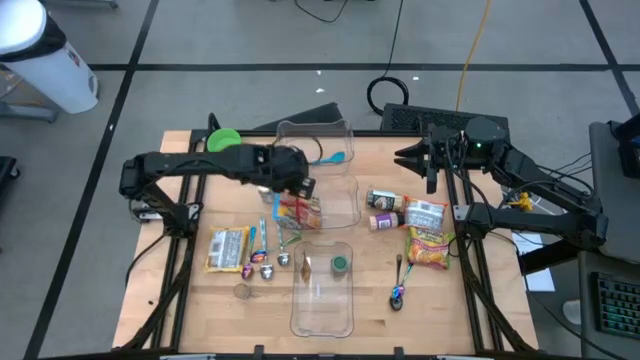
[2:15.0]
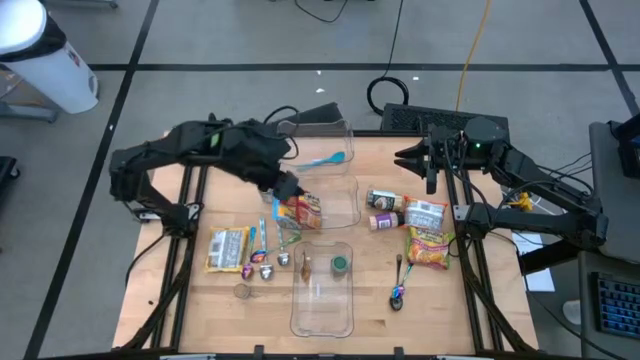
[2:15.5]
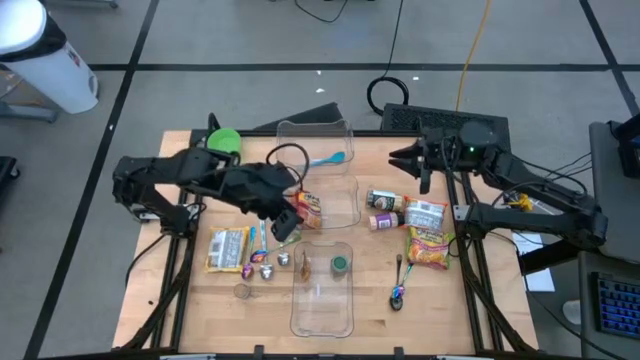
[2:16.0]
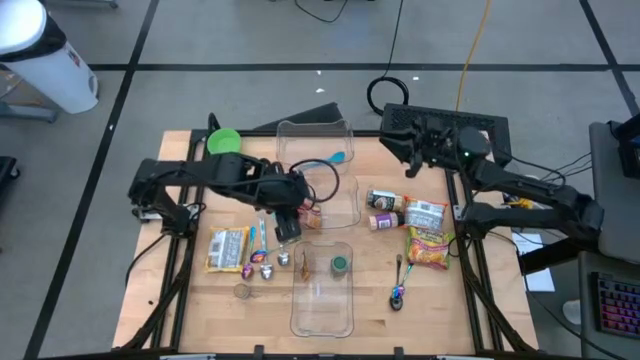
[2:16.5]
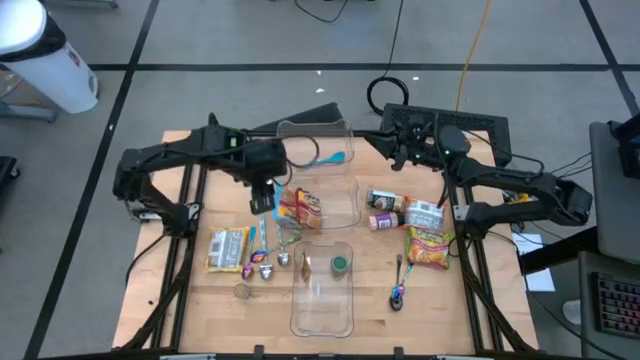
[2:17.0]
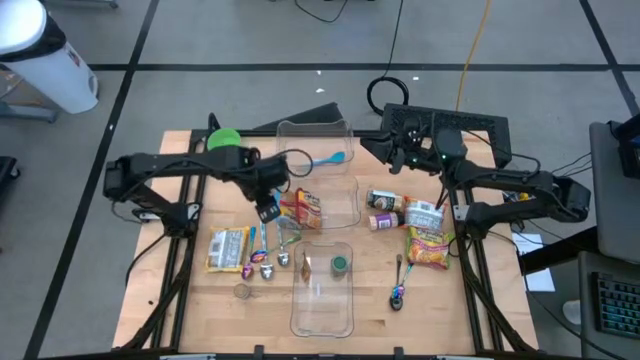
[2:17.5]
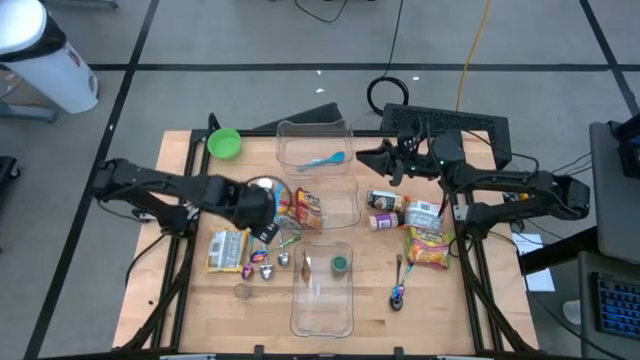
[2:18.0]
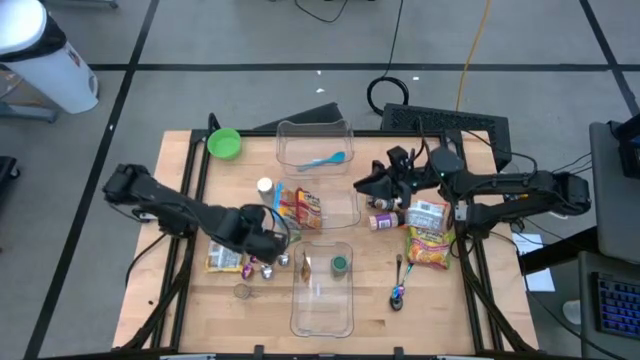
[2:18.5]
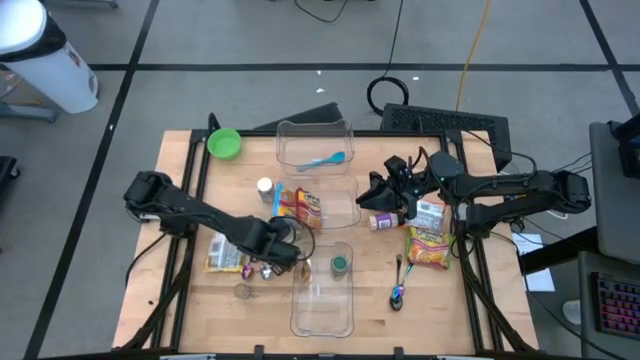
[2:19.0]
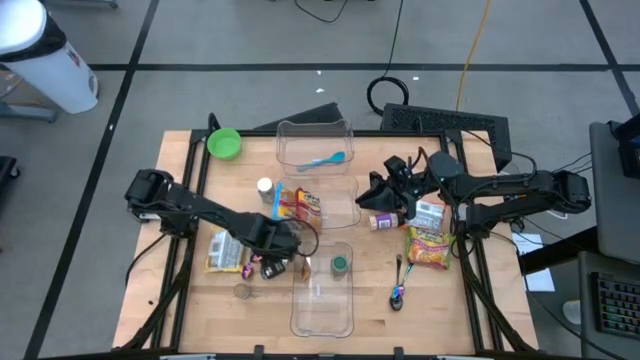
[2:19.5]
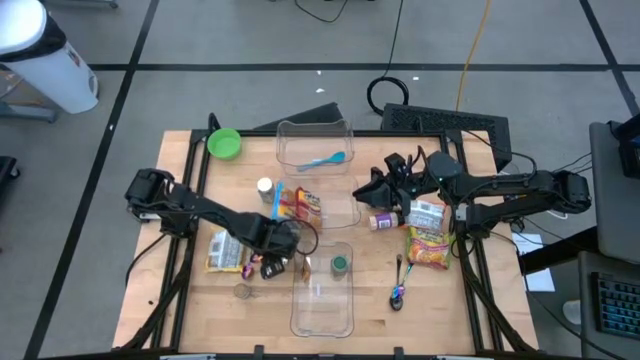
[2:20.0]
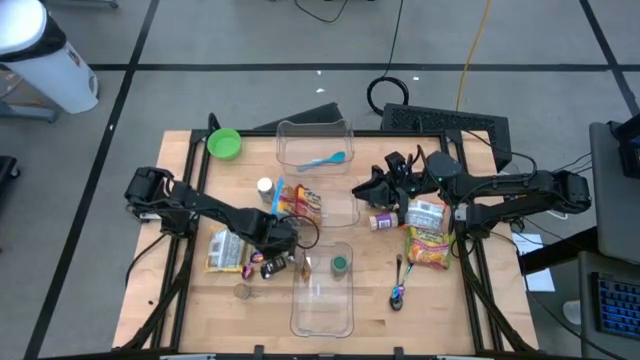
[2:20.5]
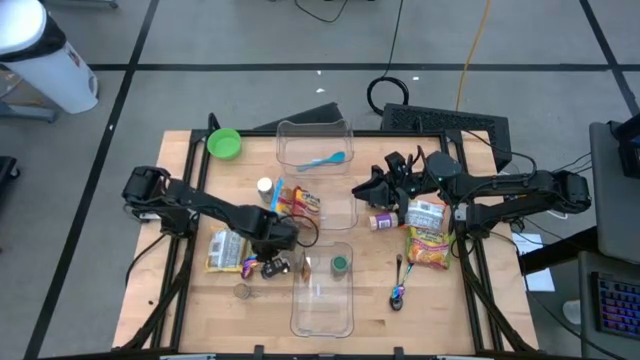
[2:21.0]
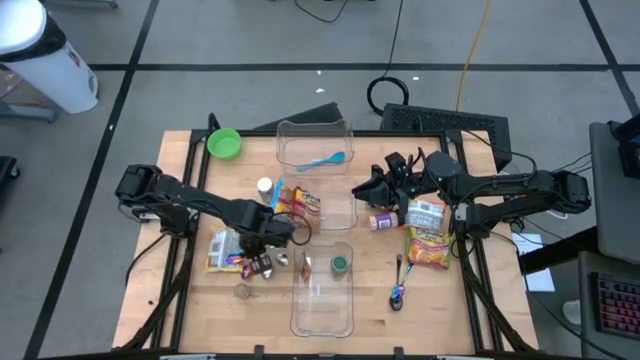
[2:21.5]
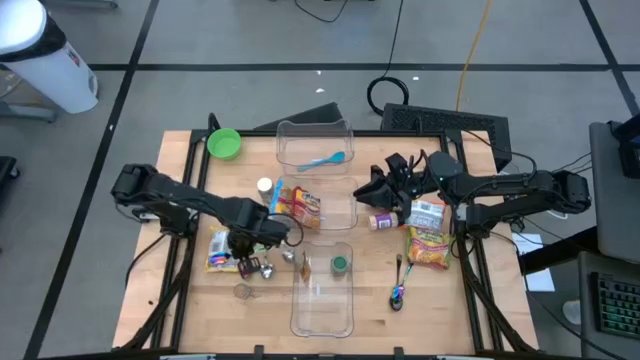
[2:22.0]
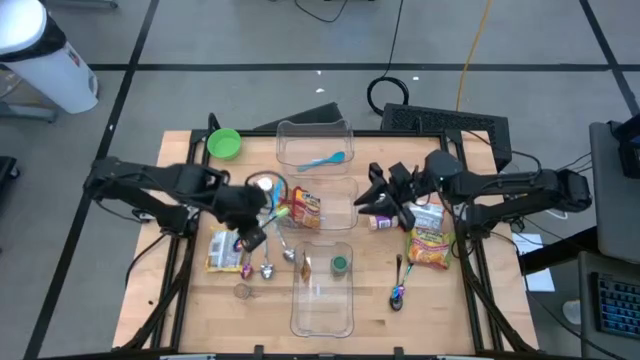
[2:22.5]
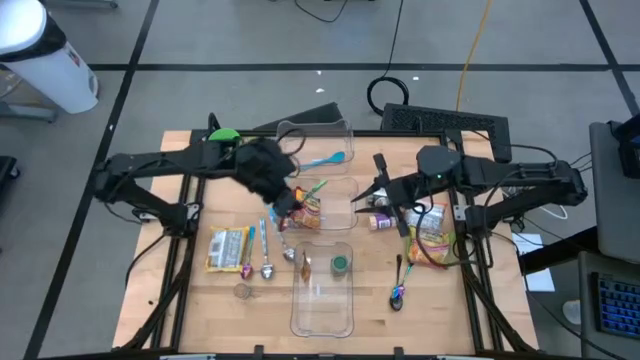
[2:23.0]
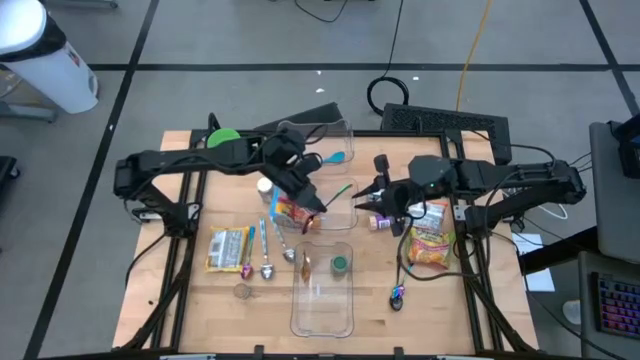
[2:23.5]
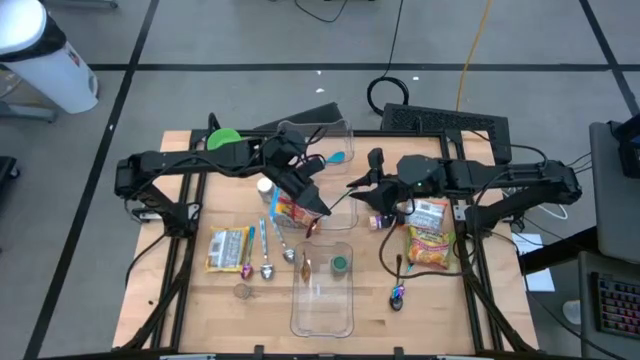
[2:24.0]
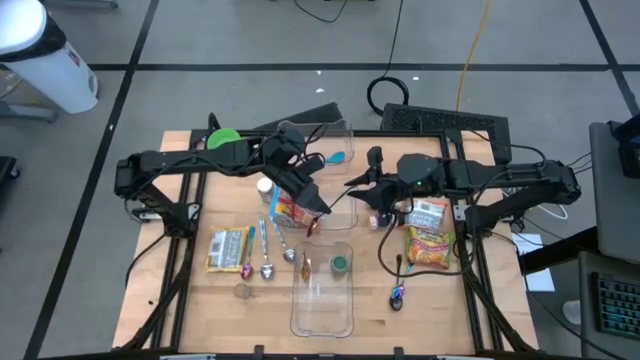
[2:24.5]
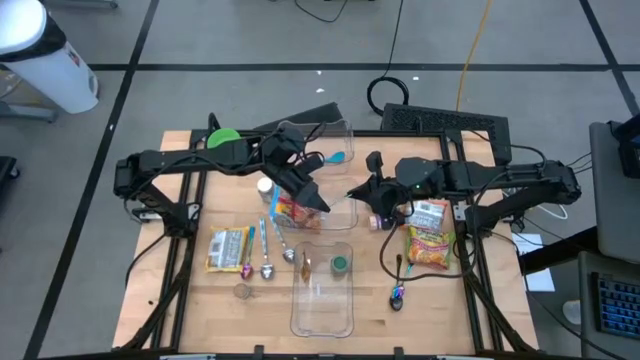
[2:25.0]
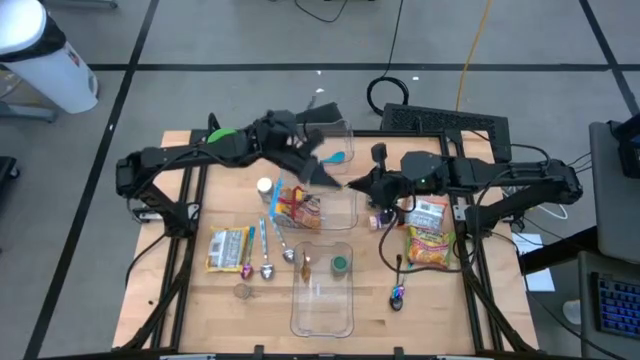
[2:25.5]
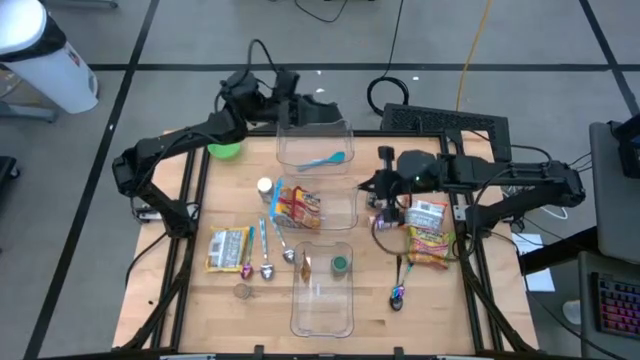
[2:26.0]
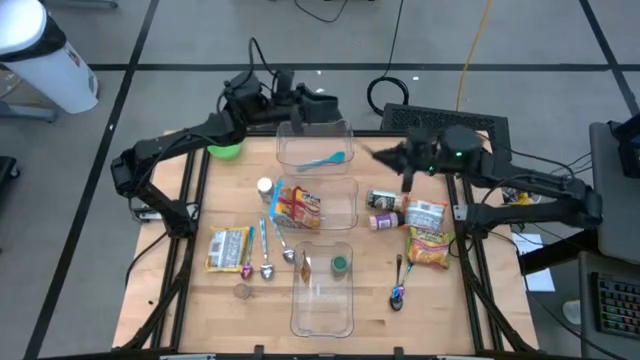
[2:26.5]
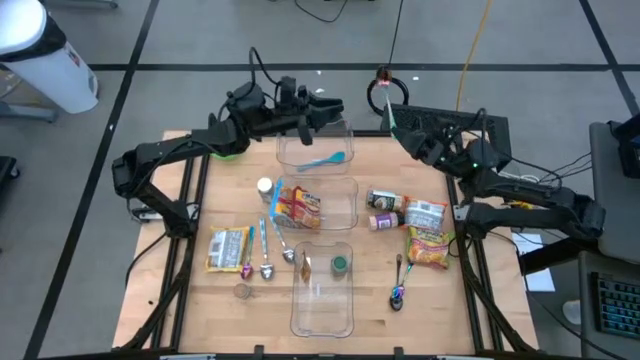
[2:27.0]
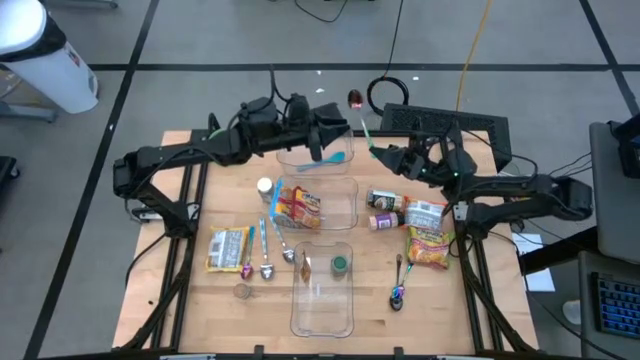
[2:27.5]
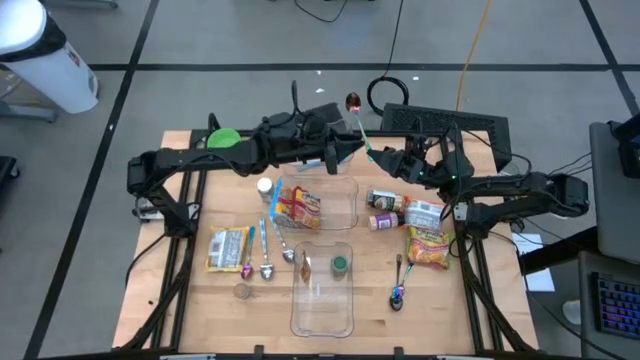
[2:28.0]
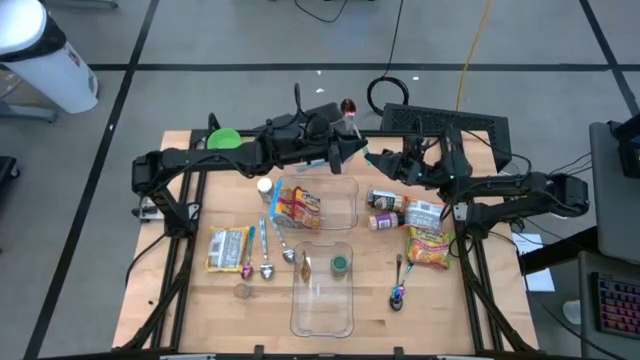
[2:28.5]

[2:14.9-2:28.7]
Task: Pick & Place Food Item
Put the green spoon into the top transparent bin

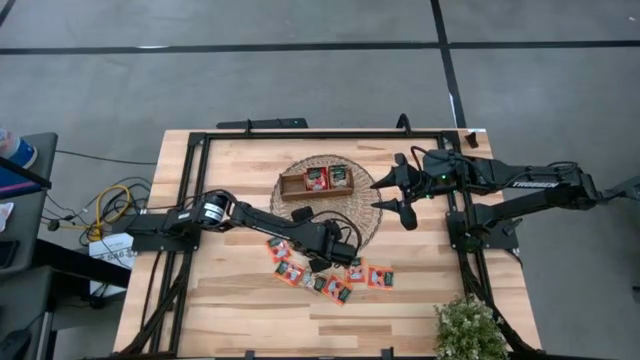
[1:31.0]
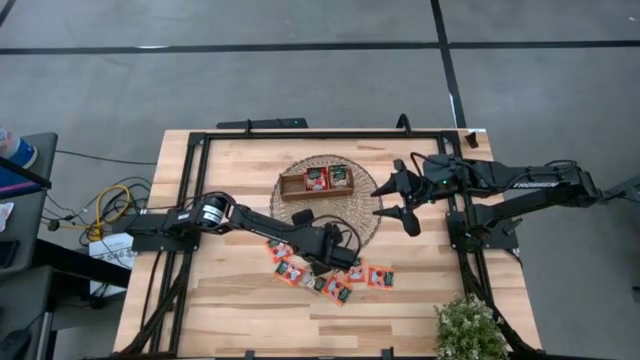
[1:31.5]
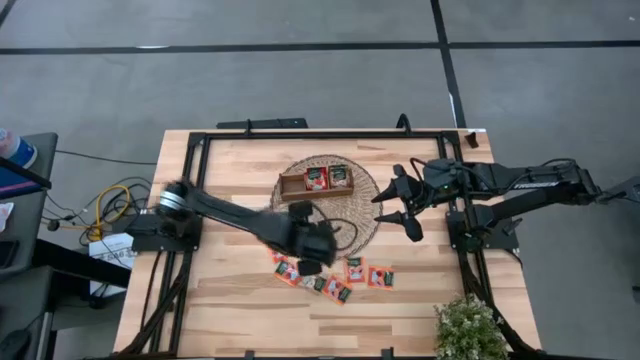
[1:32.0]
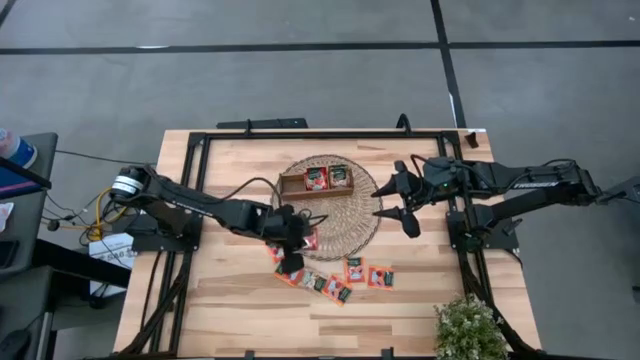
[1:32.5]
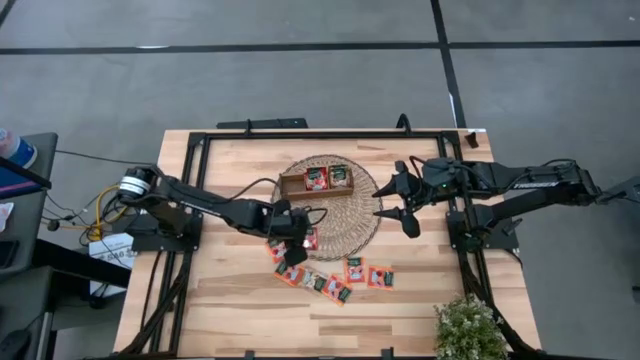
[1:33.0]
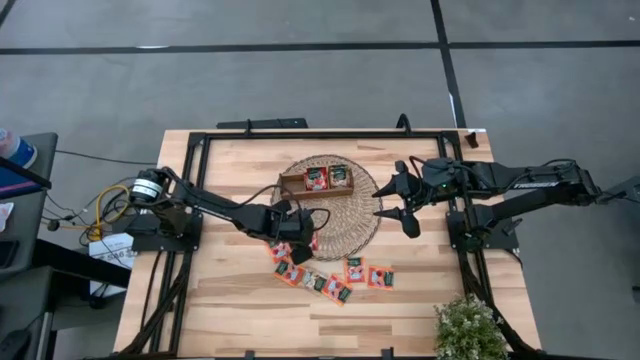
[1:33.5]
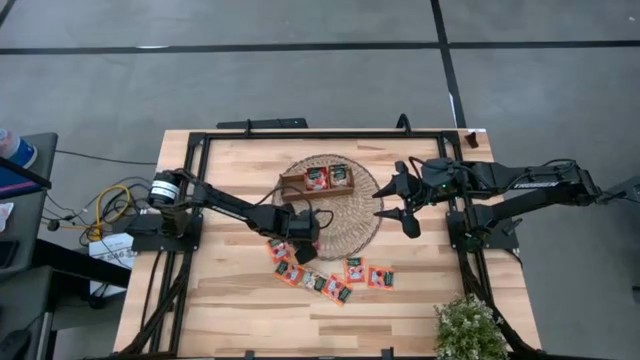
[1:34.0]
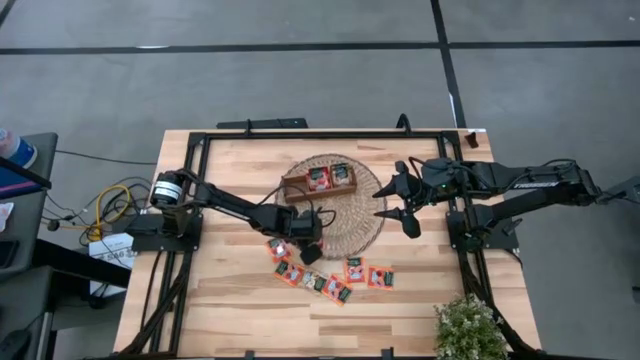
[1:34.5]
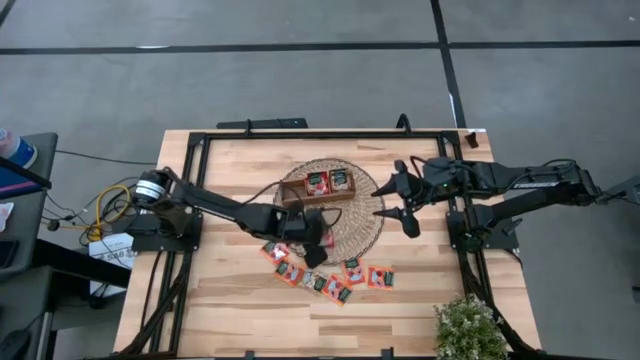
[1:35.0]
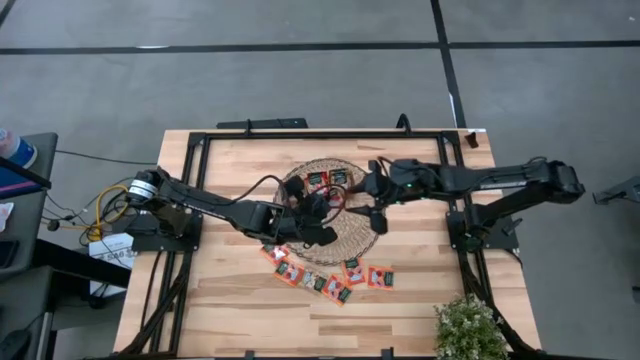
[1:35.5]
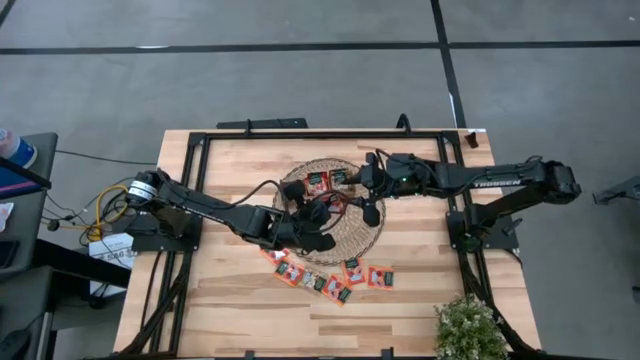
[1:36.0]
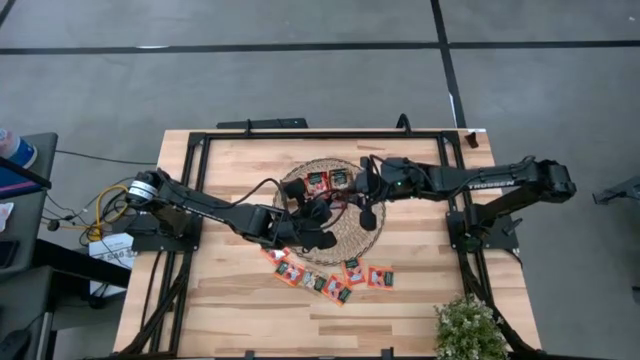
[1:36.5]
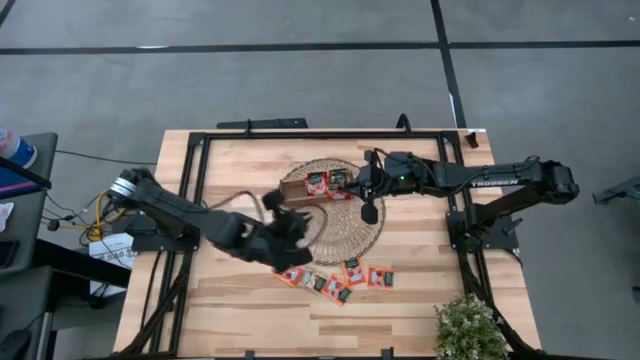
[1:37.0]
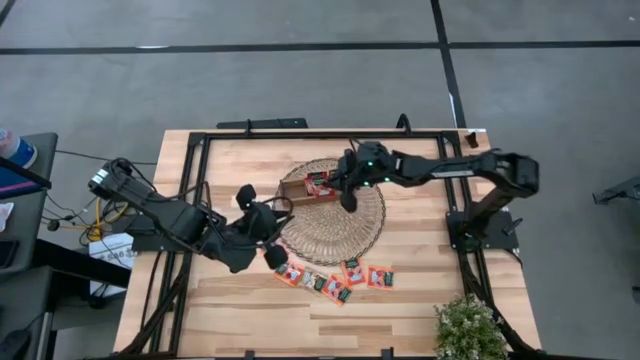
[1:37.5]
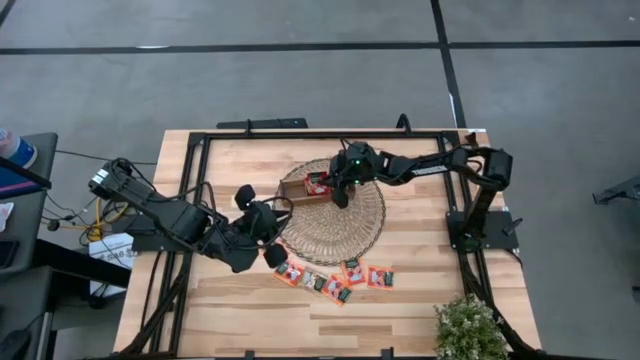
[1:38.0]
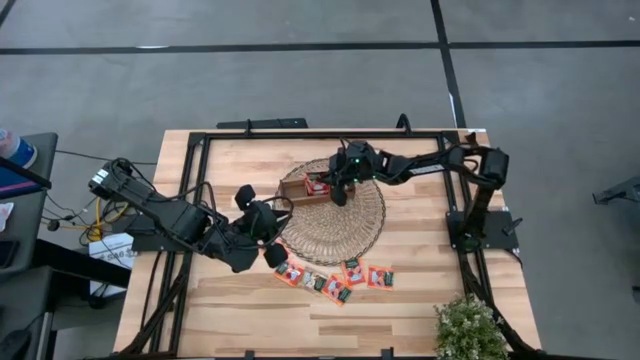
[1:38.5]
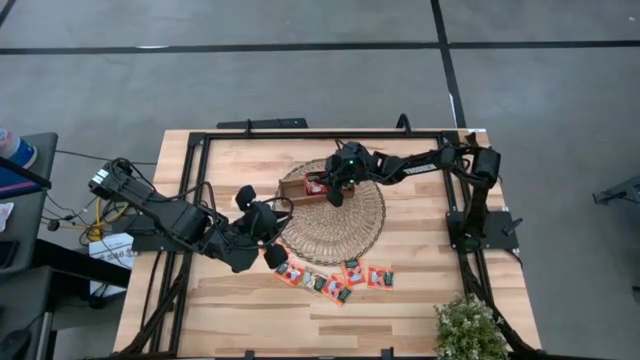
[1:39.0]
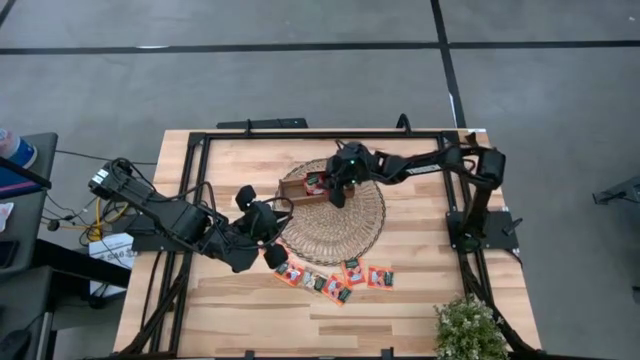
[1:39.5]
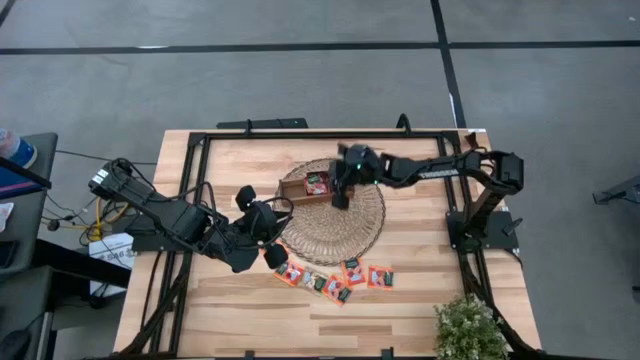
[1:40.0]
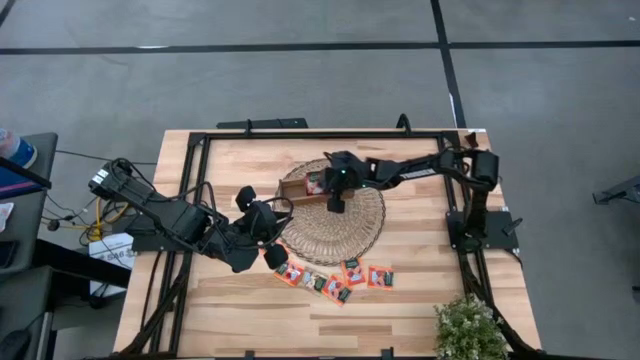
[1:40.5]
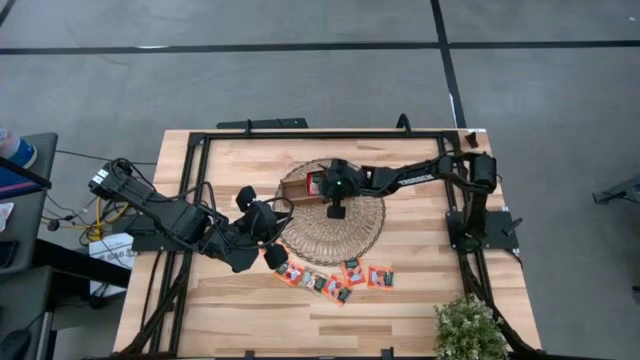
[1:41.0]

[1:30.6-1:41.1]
Task: Pick & Place Tea
Put the red tea bag into the middle section of the wooden organizer
